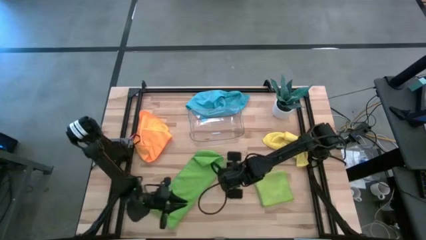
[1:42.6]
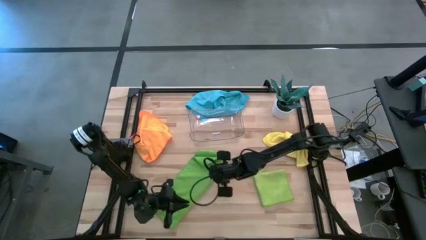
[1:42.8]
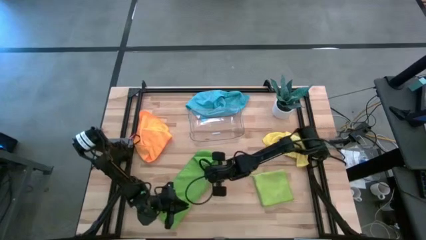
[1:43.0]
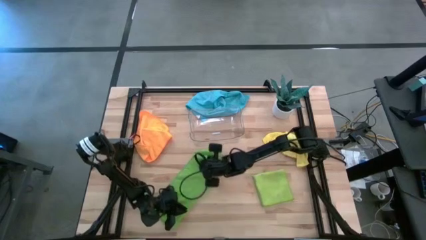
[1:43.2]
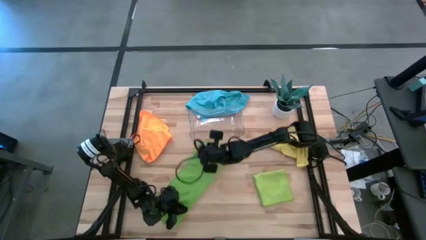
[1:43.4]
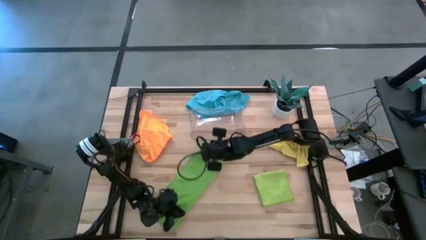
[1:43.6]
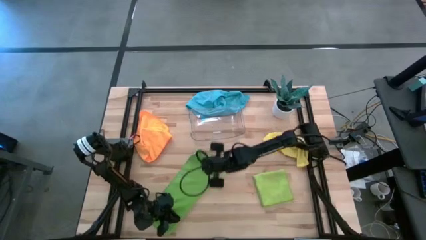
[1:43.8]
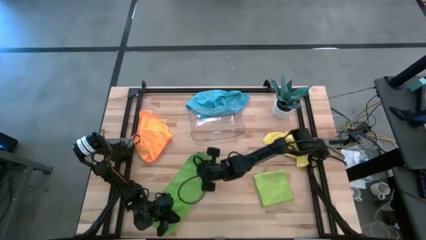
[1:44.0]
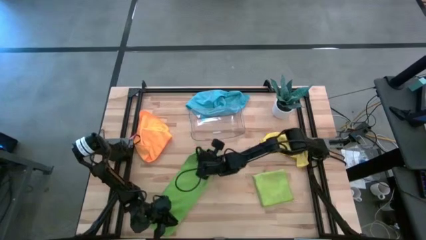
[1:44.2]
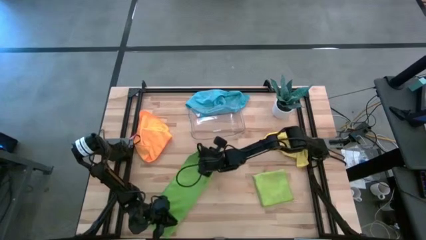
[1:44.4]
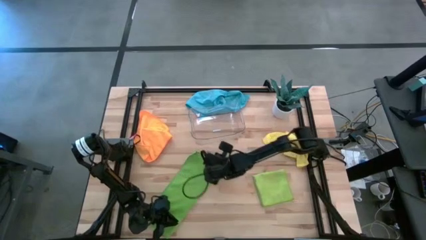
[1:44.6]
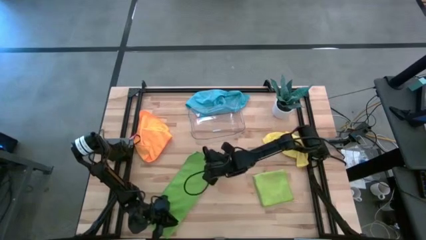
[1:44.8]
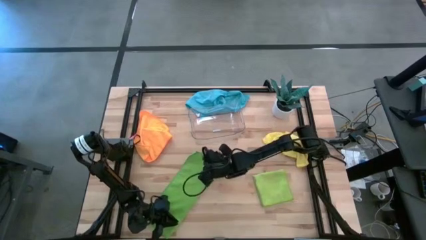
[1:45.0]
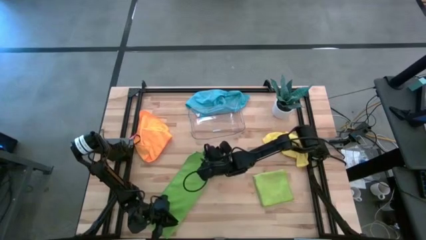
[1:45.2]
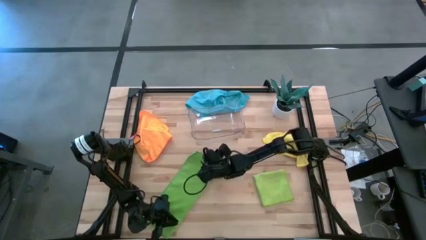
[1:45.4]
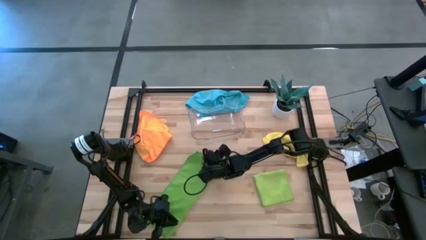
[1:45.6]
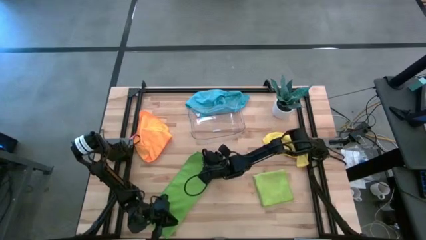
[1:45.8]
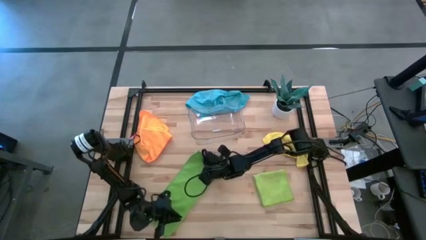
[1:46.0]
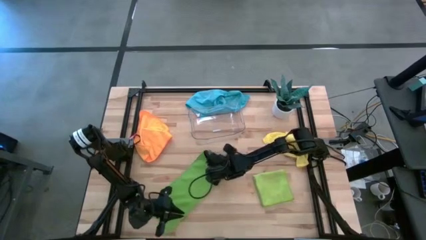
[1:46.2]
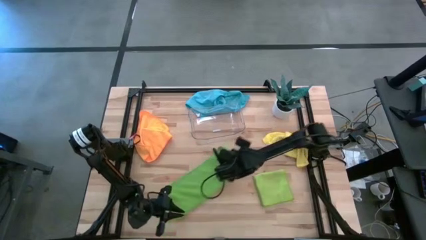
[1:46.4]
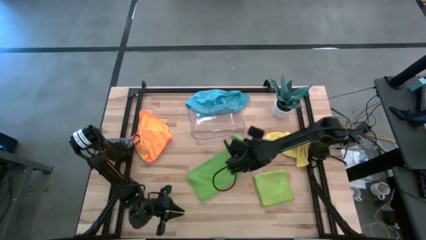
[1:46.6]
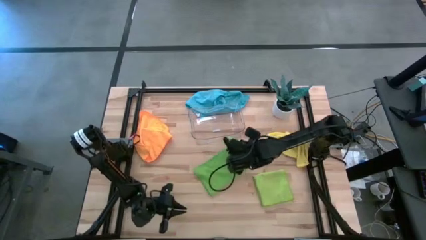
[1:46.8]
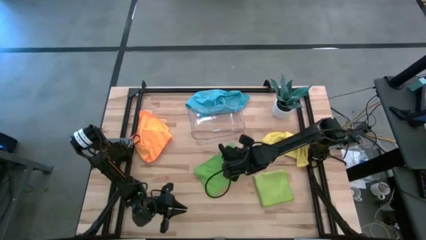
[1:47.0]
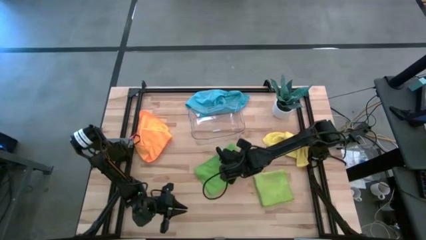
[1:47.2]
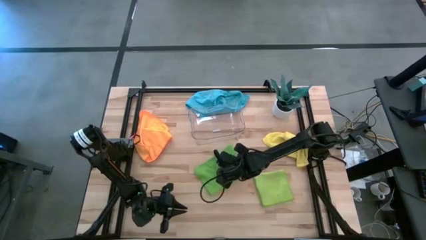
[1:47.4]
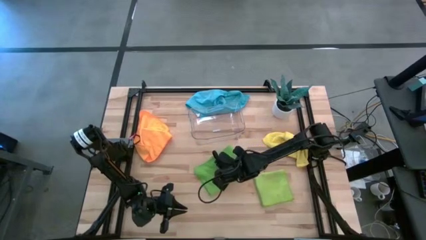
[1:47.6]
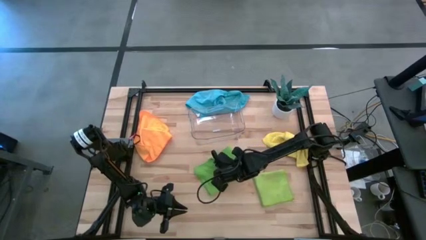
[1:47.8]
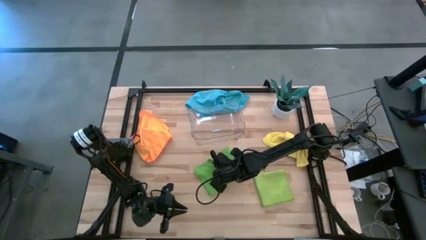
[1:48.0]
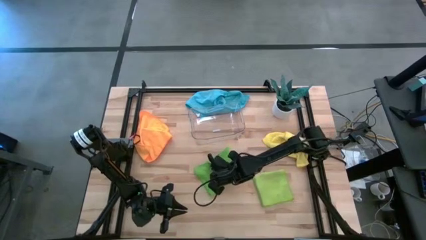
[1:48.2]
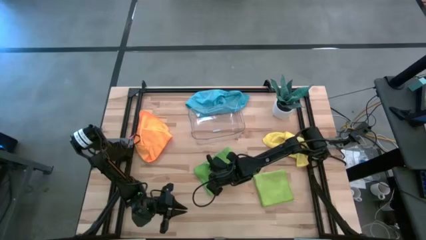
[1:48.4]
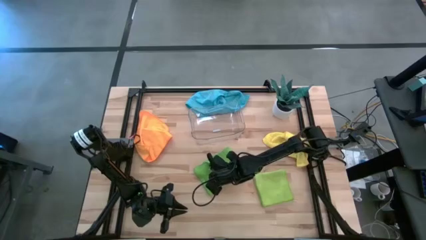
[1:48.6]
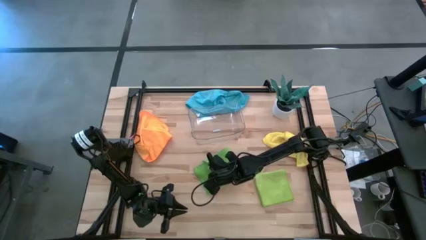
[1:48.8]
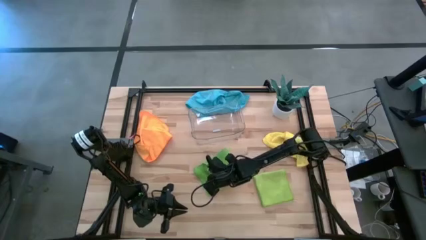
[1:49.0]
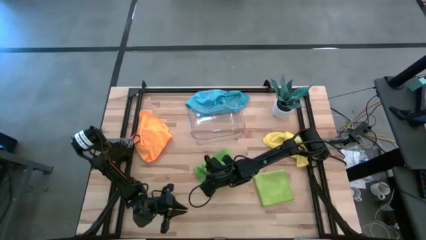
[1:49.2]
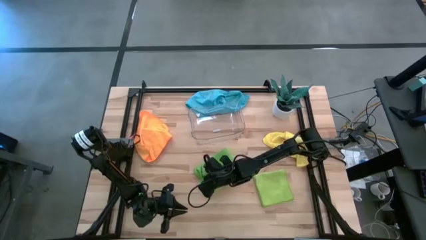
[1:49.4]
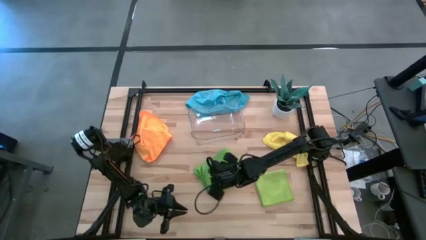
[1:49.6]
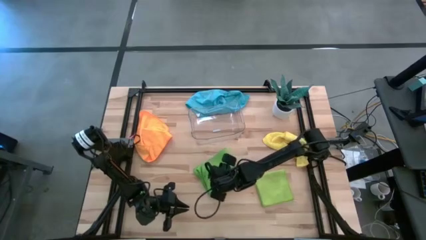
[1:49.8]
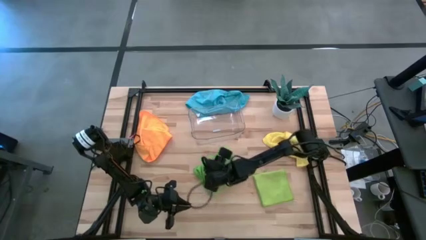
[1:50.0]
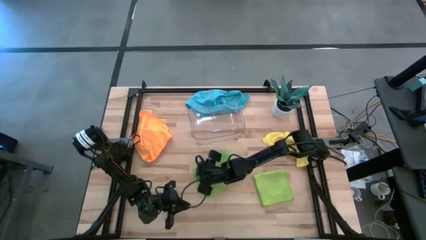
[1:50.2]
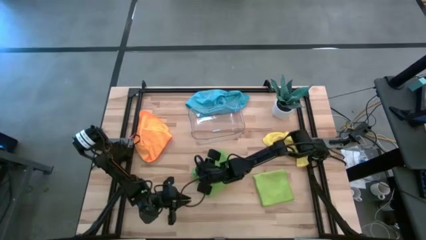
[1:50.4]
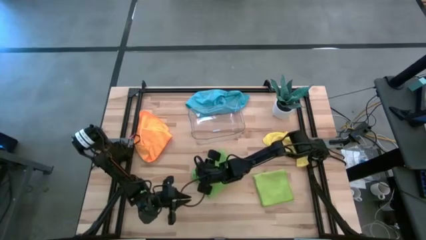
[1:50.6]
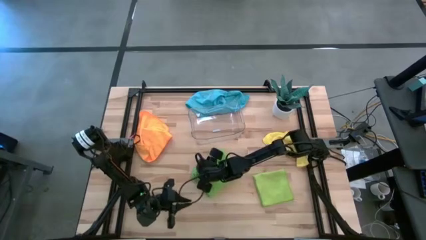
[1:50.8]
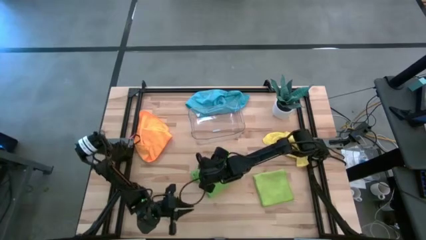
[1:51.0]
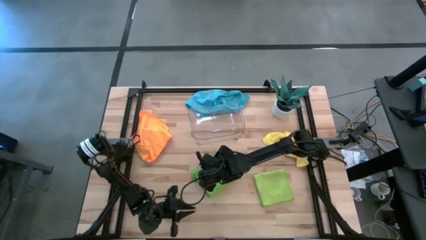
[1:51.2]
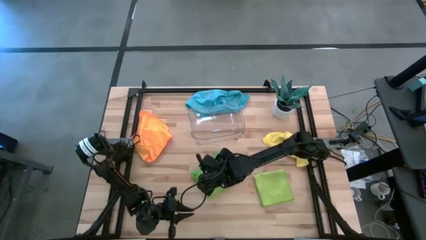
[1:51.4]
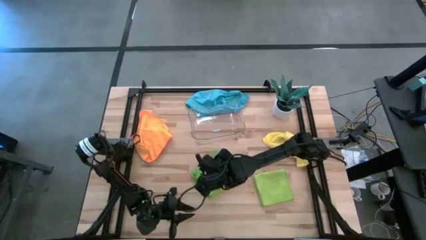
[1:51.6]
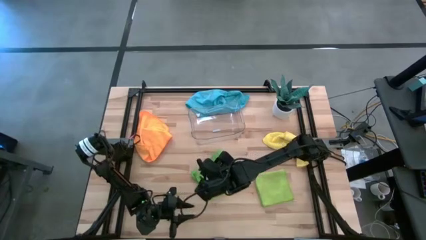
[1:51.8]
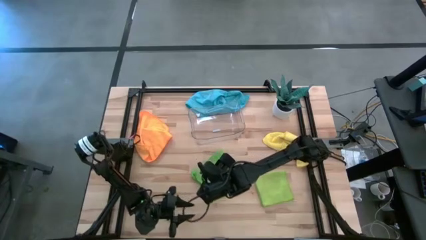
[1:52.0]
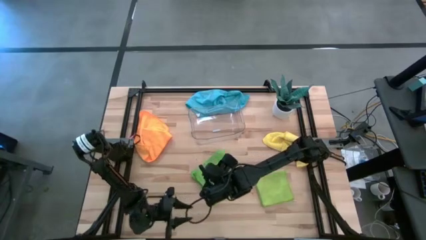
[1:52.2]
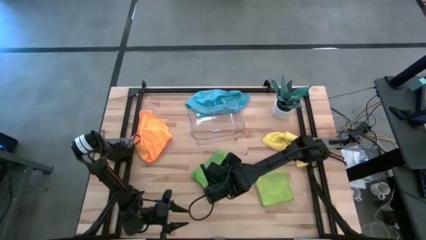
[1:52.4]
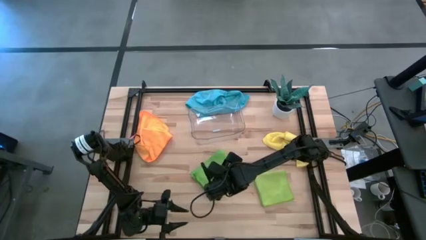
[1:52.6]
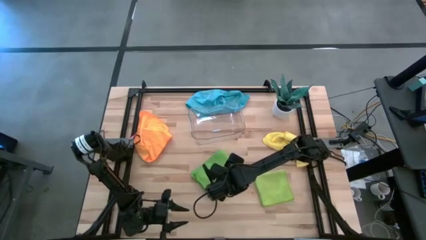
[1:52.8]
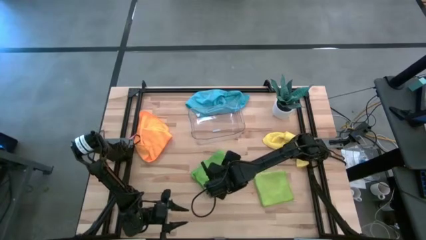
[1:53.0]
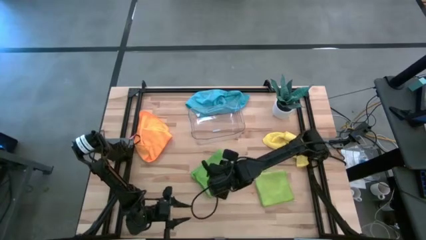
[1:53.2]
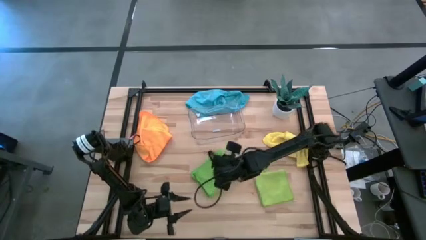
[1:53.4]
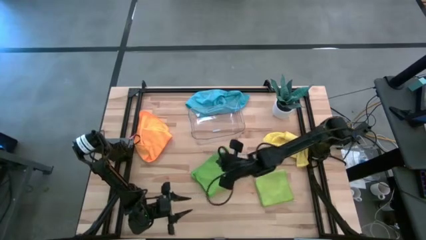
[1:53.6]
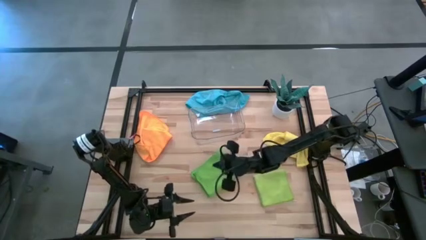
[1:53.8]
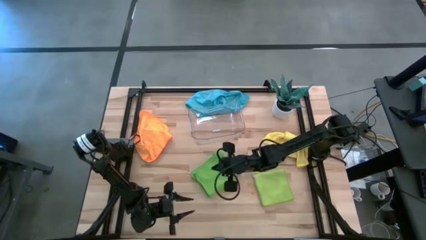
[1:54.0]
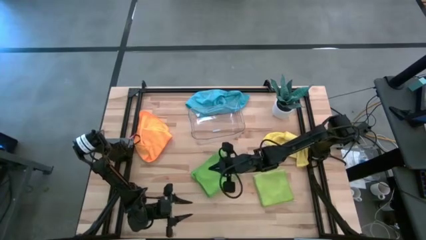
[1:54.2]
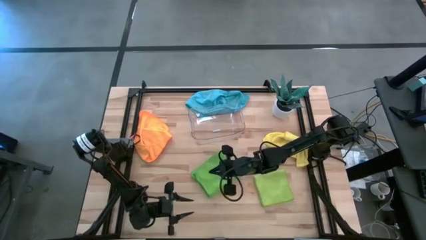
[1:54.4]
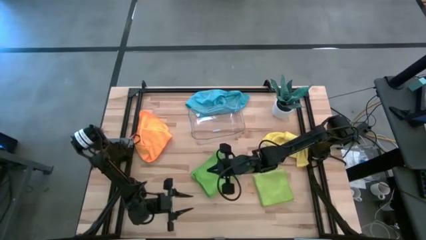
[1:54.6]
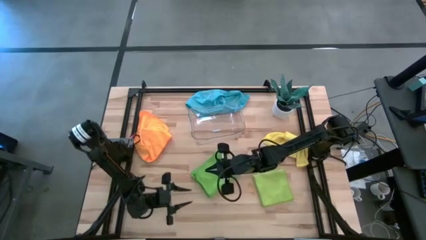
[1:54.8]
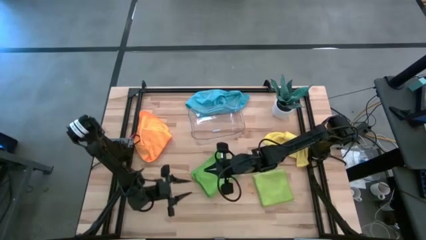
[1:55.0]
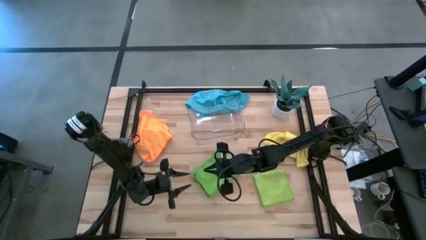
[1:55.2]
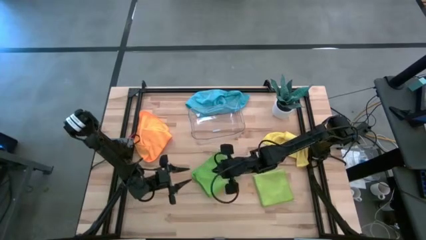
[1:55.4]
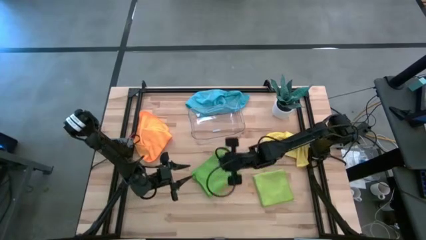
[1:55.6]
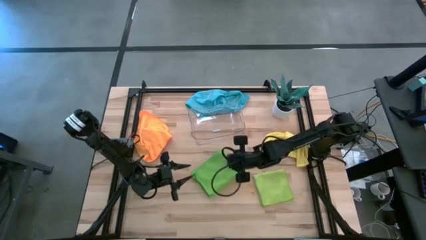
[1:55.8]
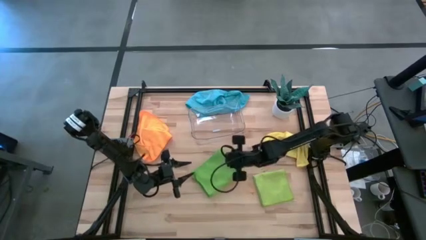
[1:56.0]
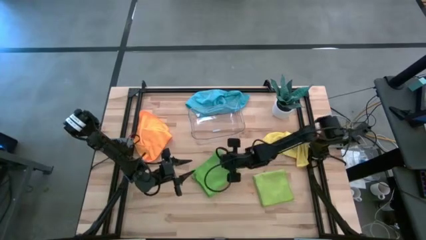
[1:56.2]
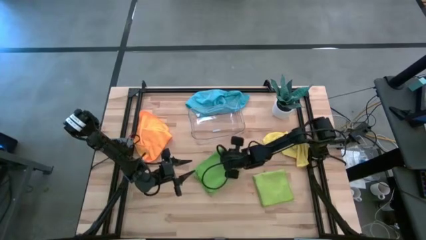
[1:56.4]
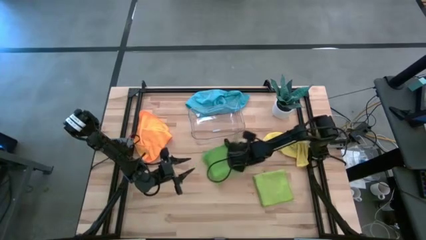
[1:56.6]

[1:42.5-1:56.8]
Task: Fold microfiber towels
Fold the green microfiber cloth

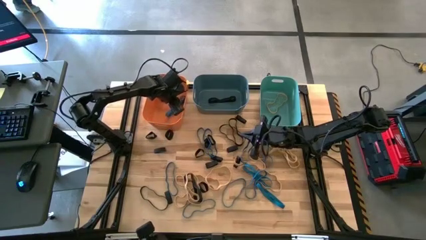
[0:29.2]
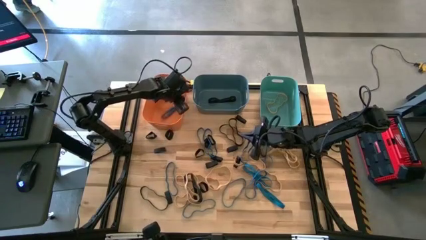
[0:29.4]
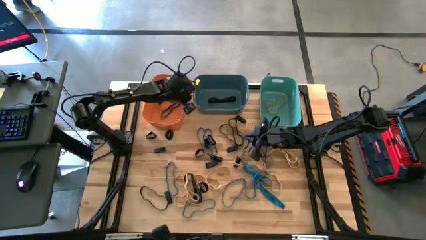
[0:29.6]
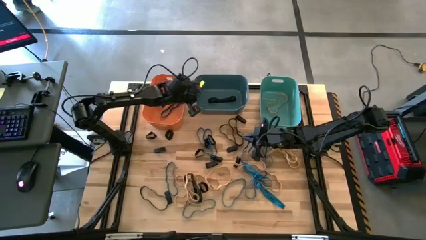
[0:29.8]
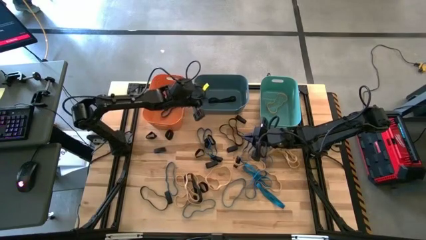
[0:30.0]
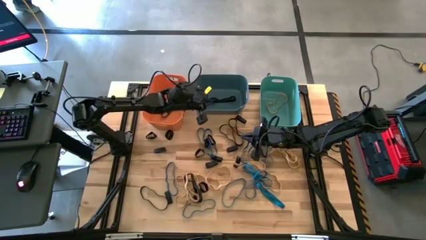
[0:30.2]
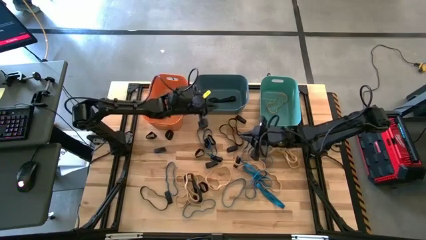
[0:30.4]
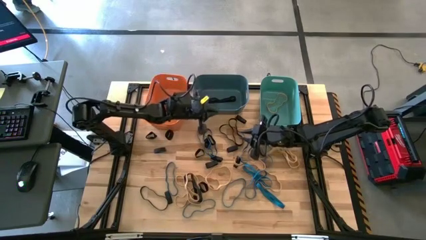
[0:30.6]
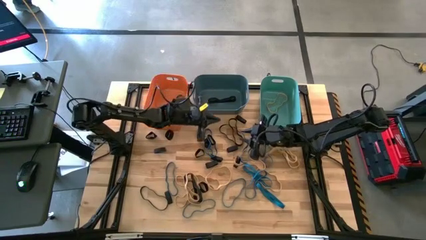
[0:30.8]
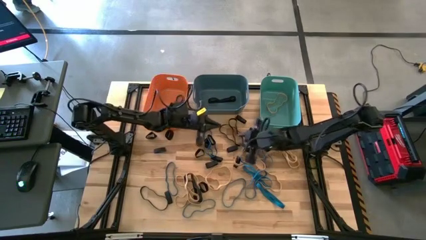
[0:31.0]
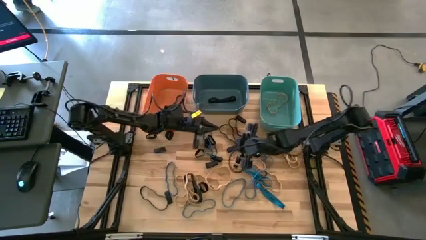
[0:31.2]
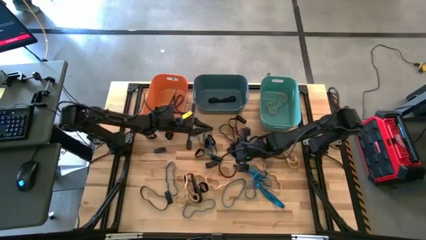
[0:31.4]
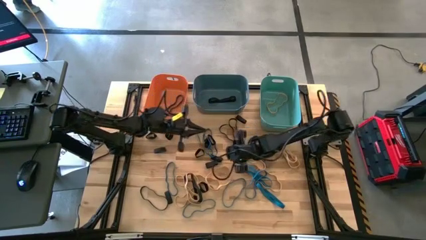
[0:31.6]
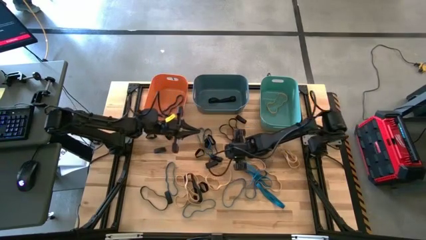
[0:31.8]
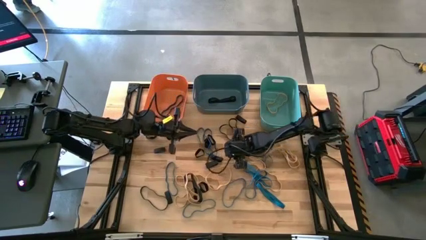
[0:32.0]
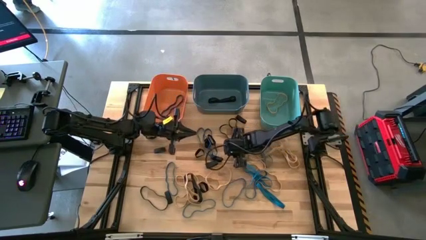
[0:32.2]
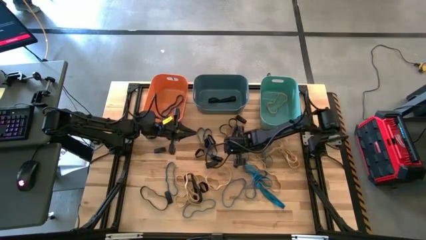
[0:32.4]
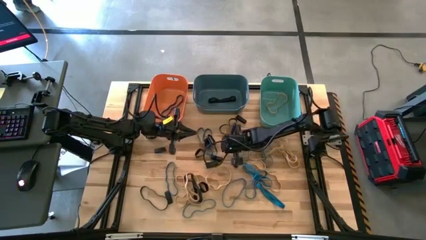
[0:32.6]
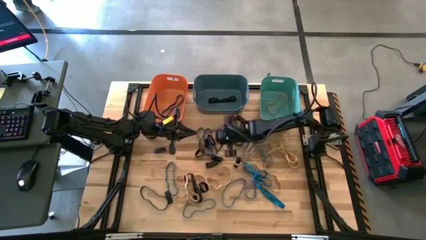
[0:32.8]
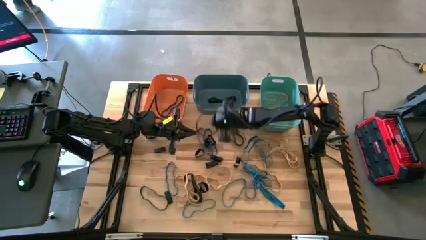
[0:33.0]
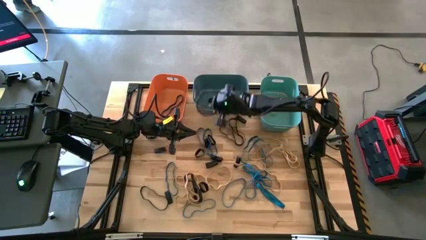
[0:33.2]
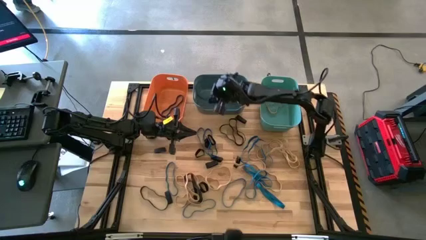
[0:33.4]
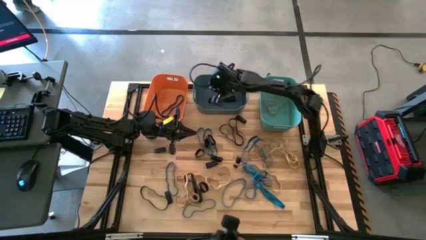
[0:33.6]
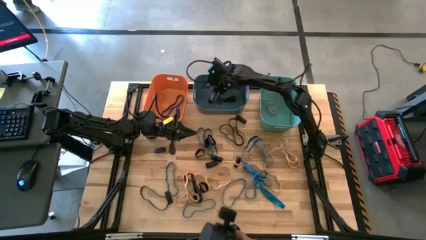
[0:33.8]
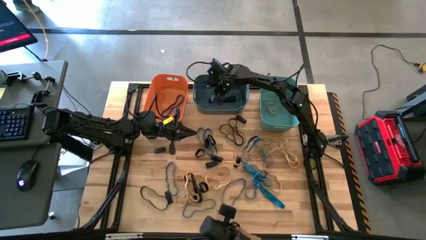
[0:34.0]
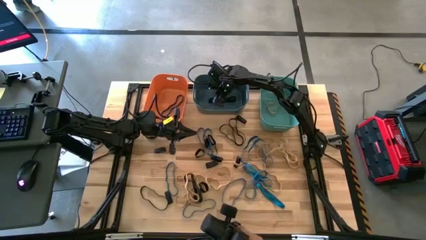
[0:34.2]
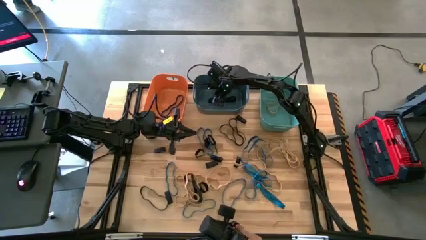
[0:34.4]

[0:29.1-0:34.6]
Task: Sort rubber bands into baskets
Put the black rubber band into the blue bin
